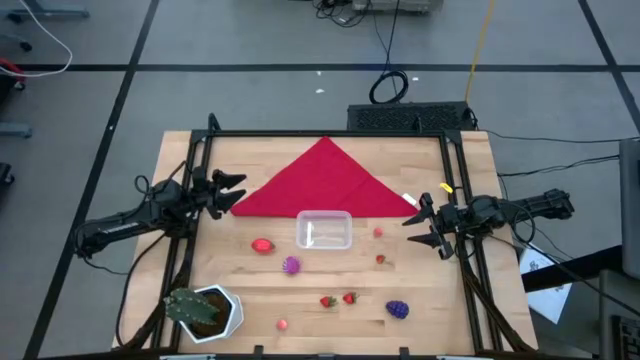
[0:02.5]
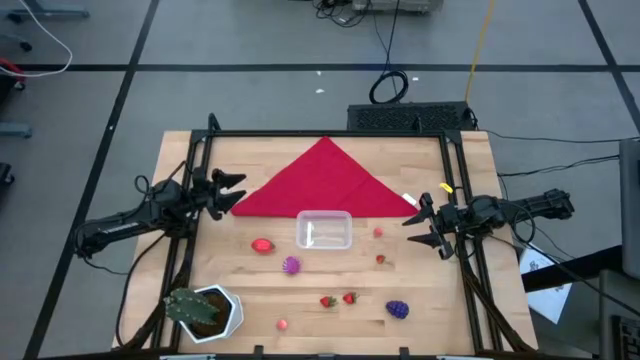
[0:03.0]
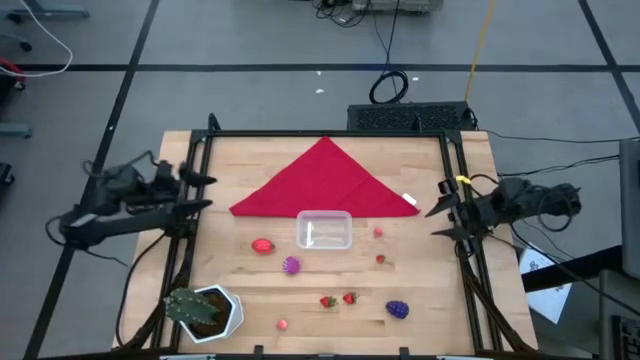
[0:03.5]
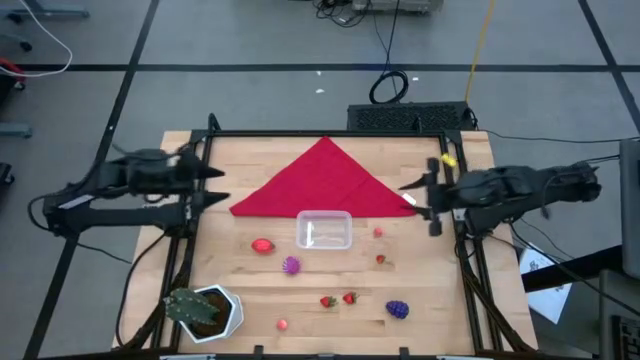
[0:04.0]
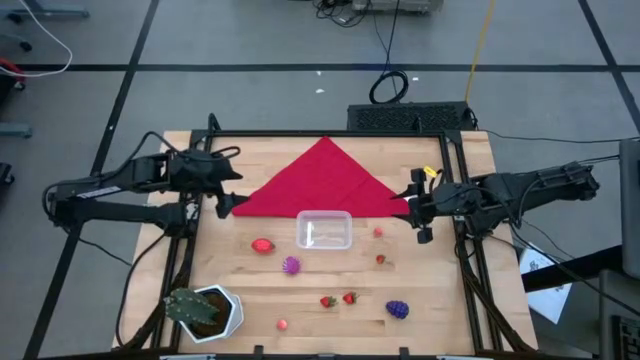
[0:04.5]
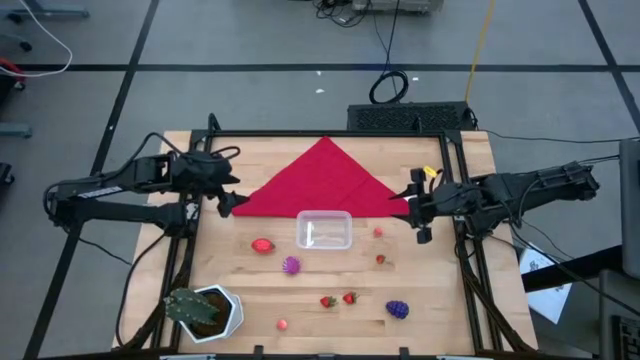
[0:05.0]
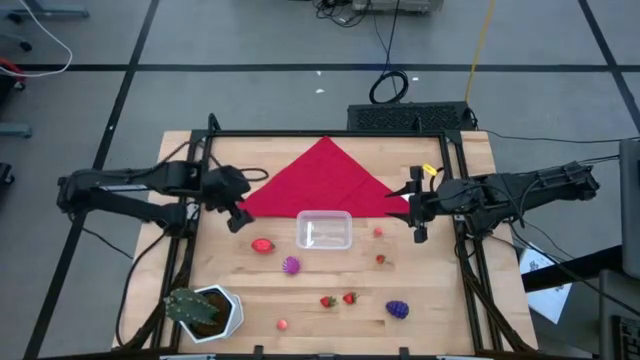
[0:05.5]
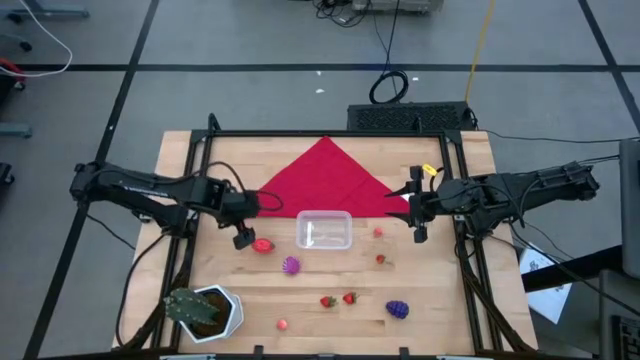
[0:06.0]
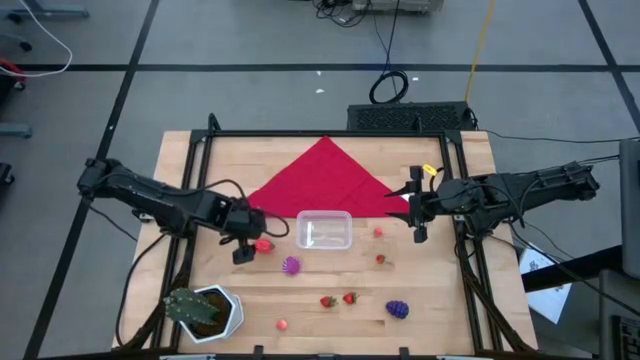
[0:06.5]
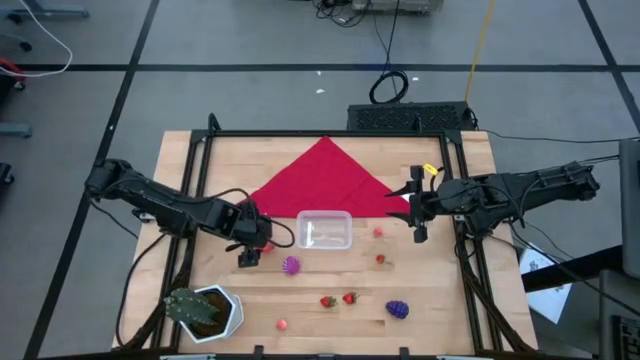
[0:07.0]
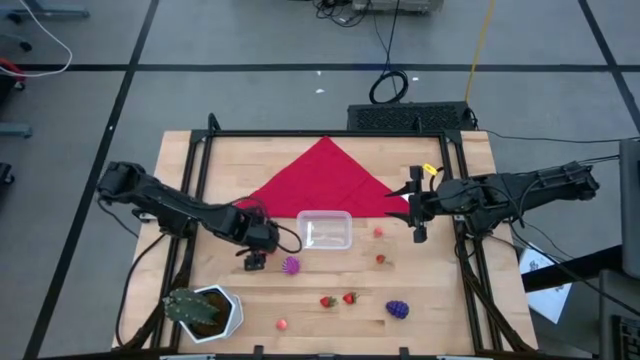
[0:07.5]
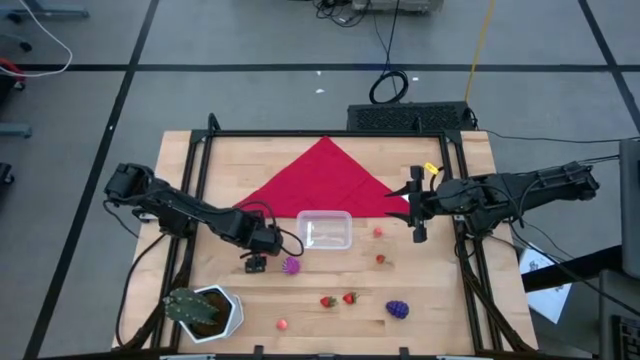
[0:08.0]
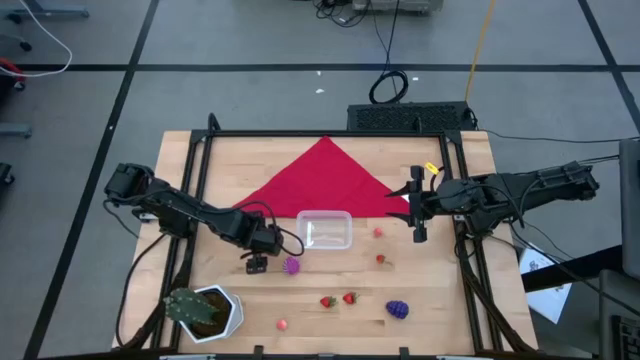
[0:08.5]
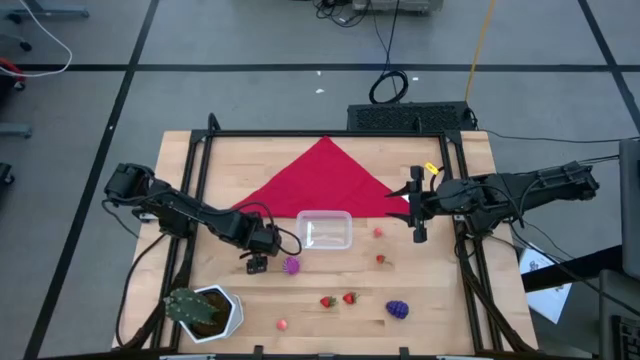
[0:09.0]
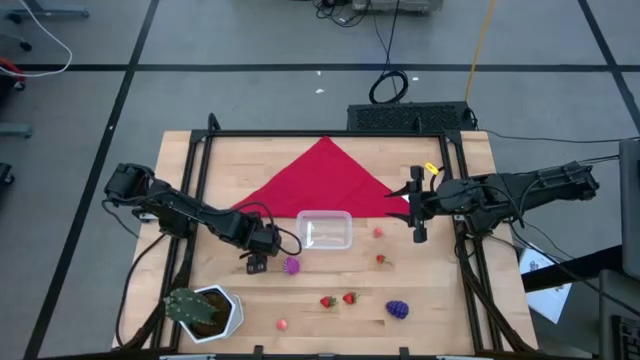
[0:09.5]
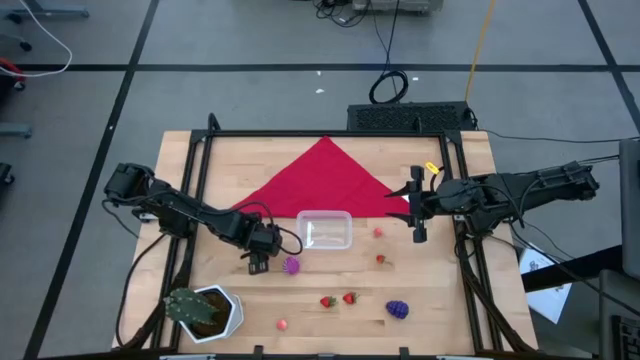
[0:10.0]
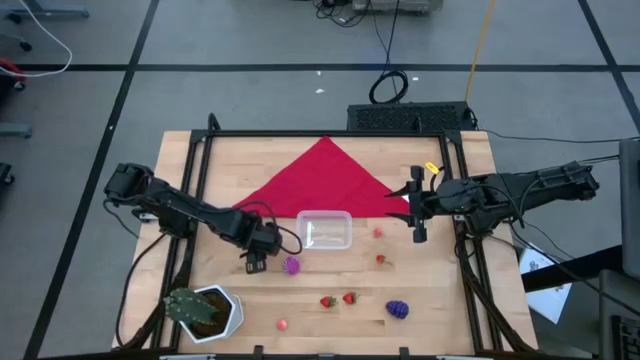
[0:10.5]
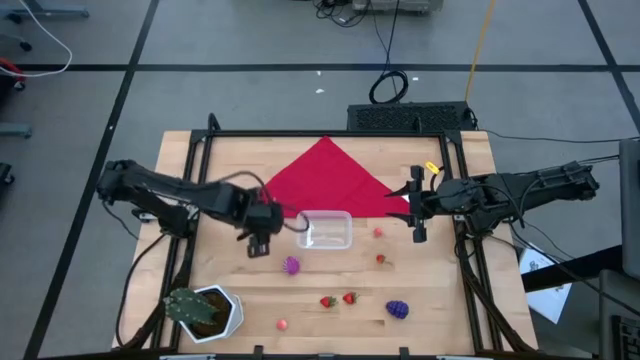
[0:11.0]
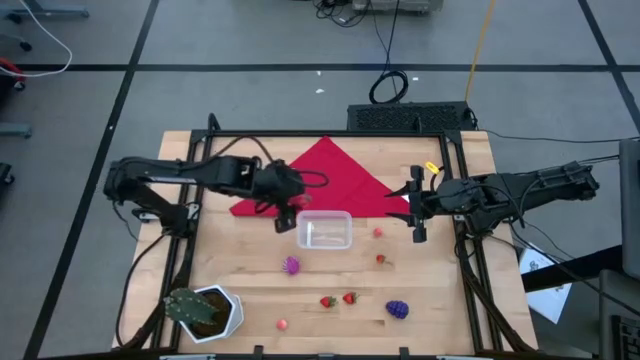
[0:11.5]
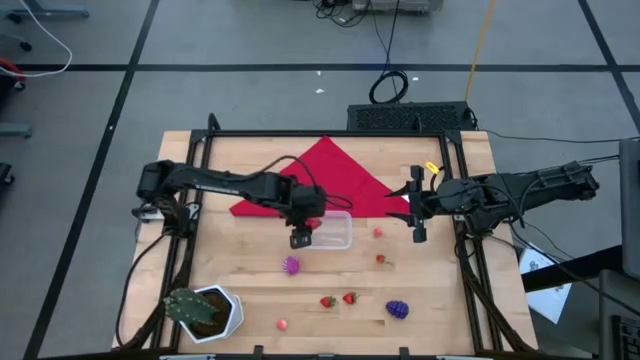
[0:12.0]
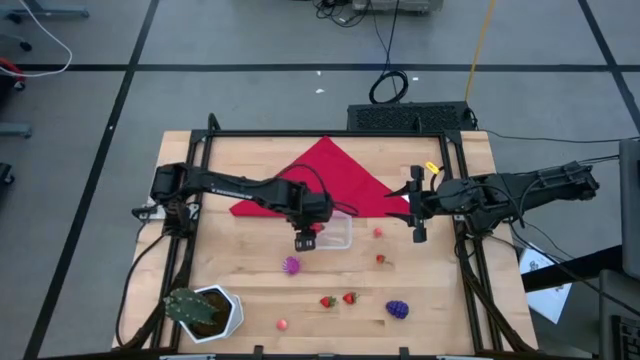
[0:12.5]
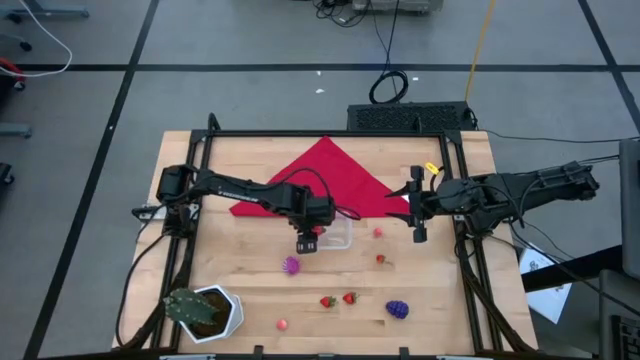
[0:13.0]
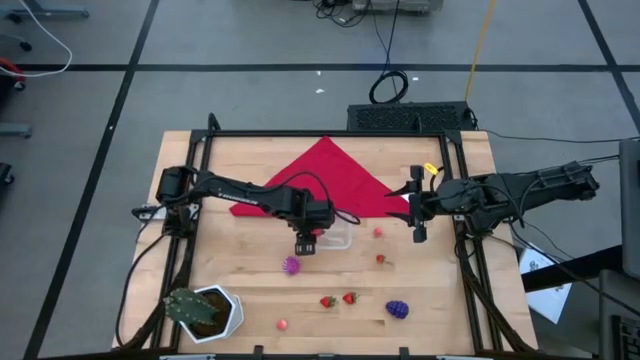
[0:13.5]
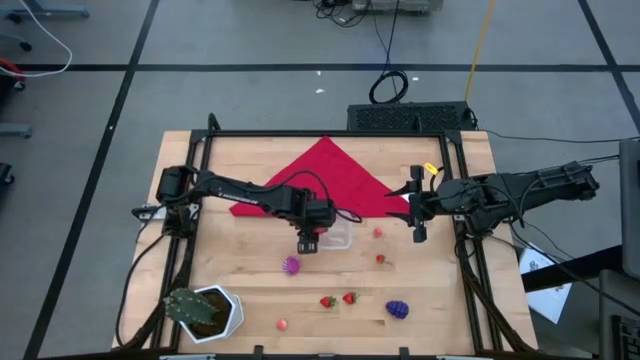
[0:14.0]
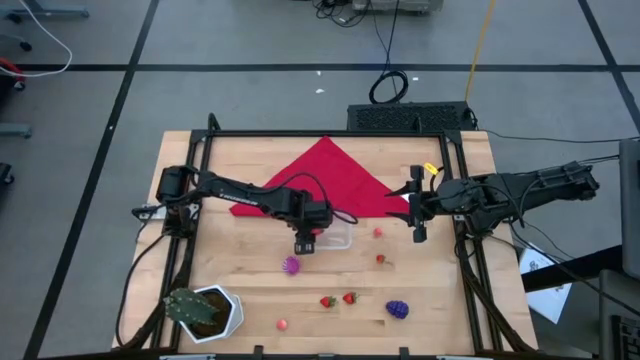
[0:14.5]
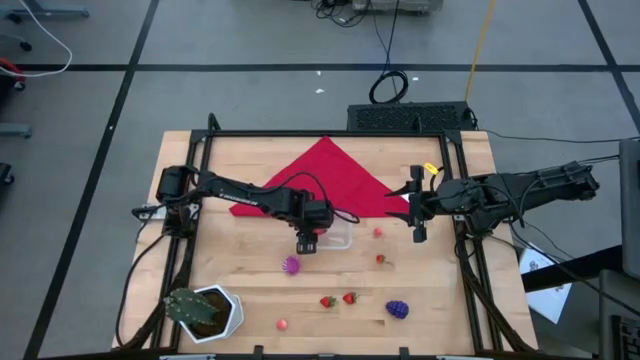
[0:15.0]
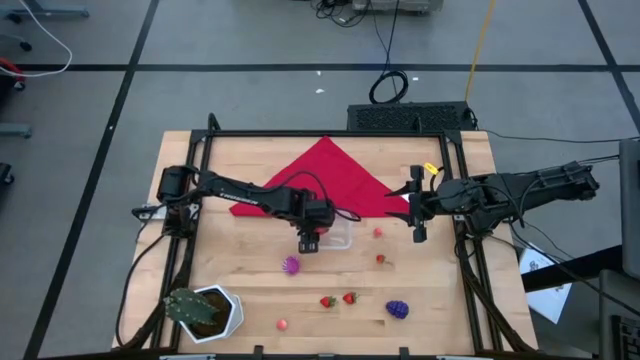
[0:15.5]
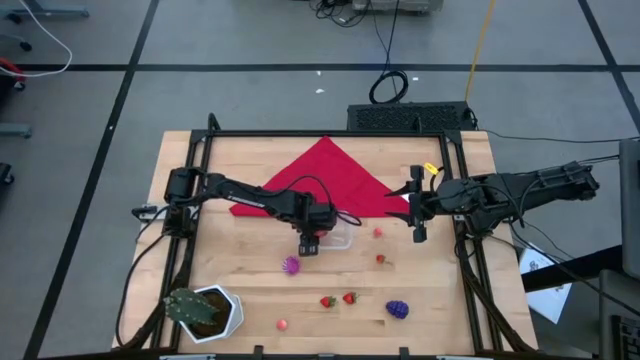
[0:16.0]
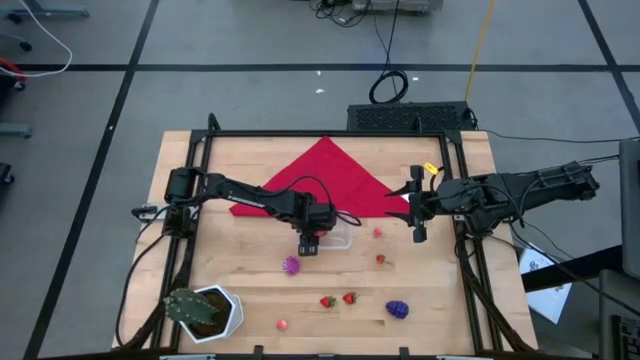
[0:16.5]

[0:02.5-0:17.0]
Task: Pick and placing Produce into tupperware
Put the red dragon fruit in the transparent bin

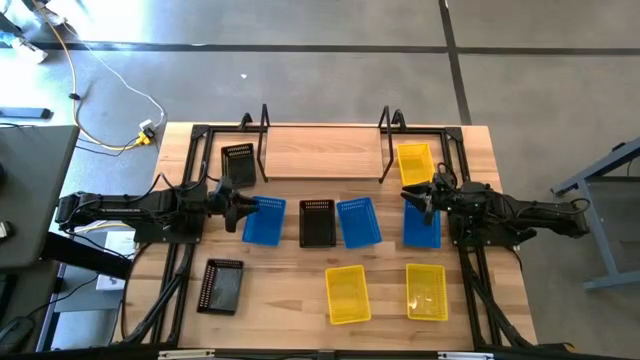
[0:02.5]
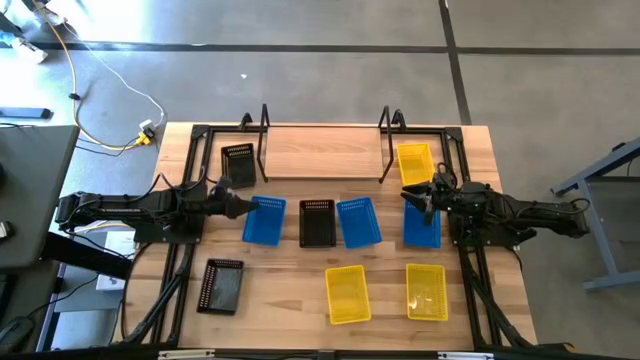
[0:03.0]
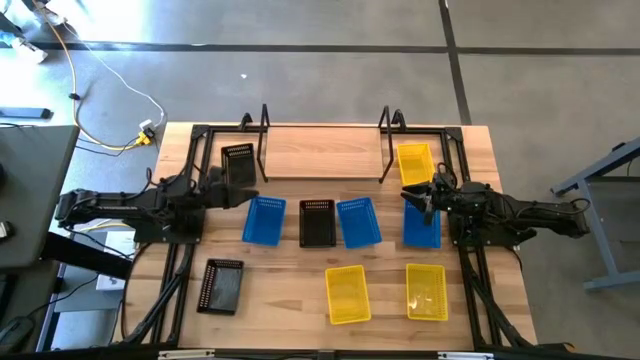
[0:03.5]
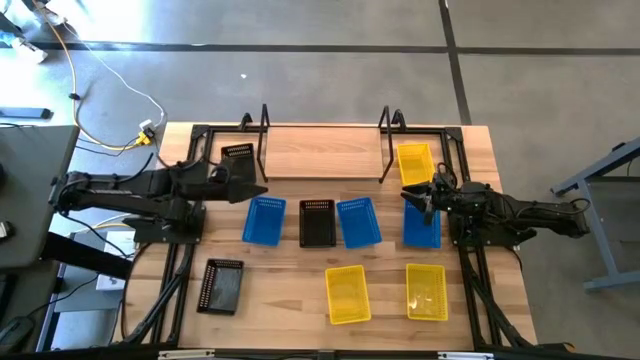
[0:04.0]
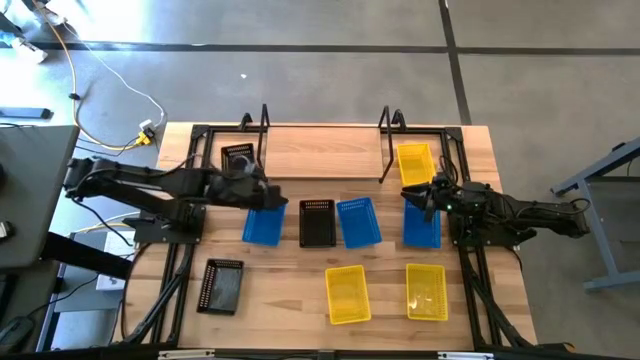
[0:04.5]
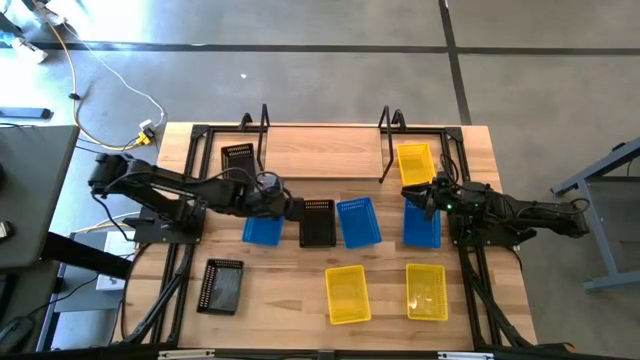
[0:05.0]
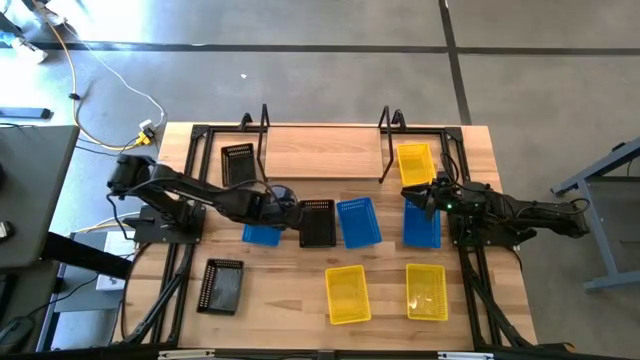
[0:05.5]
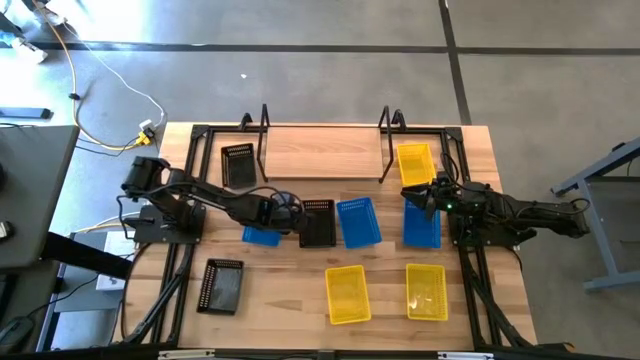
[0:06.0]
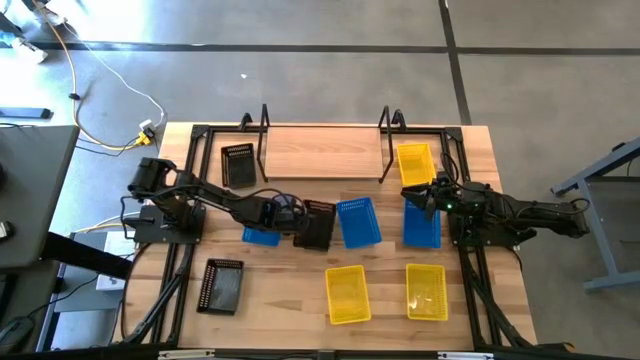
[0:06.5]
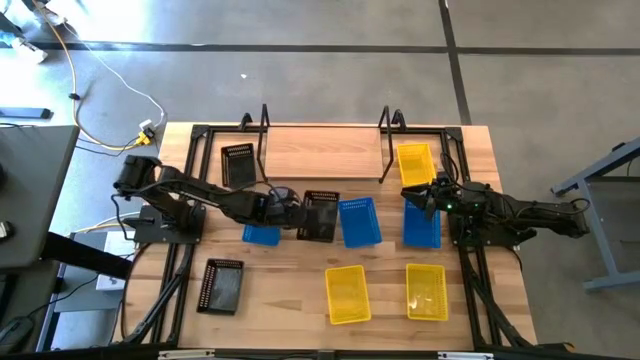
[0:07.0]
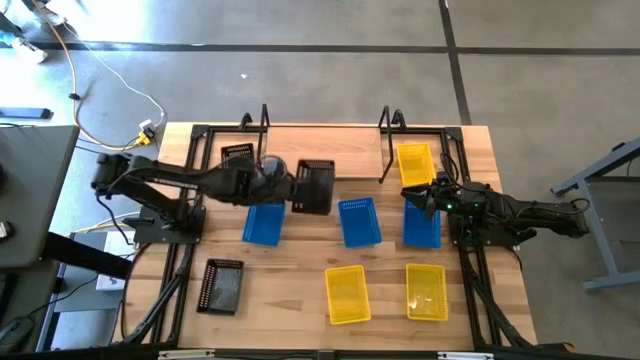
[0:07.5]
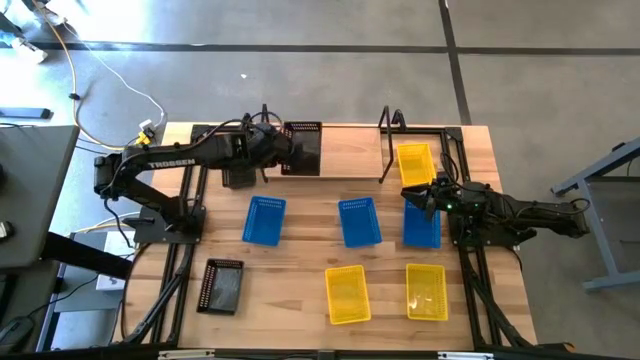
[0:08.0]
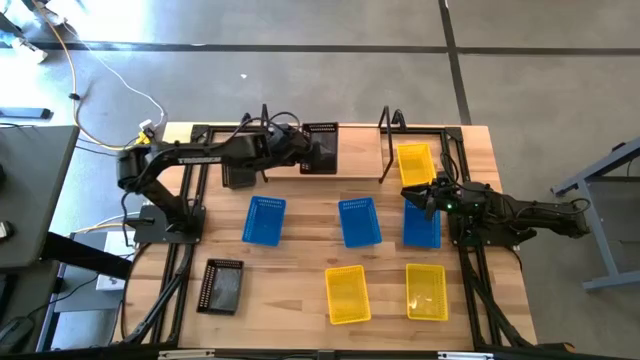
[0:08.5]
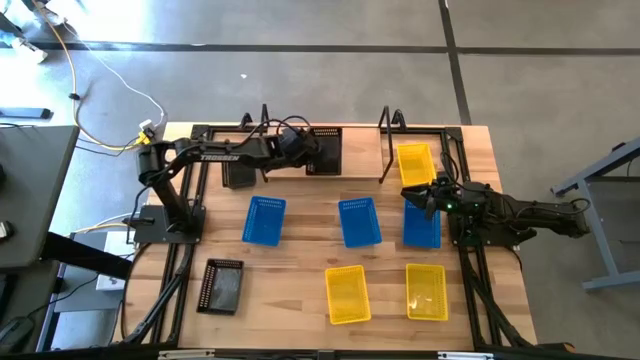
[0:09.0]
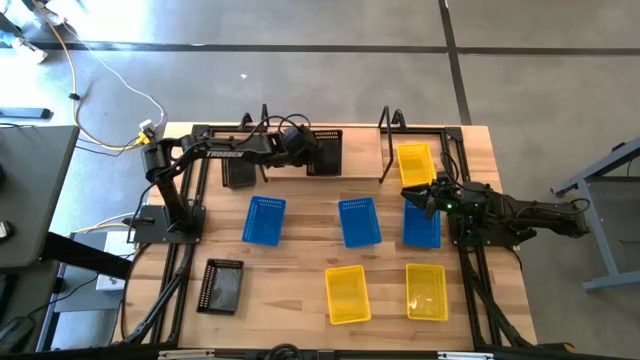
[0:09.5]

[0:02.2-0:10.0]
Task: Stack baskets on shelf by color
Put the middle black bin on the shelf
